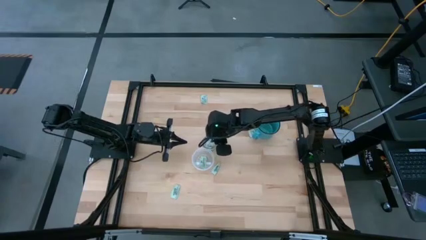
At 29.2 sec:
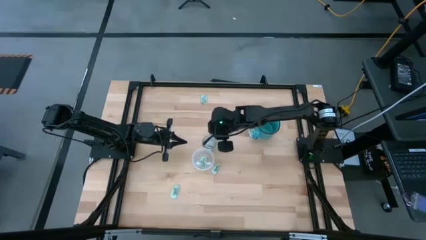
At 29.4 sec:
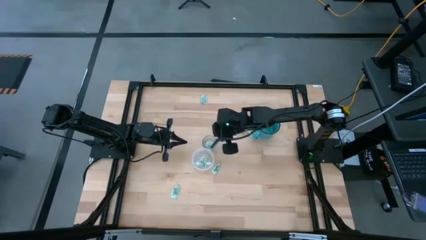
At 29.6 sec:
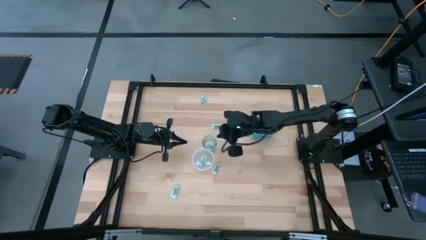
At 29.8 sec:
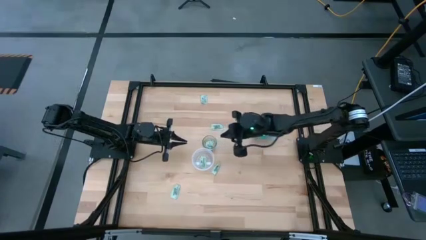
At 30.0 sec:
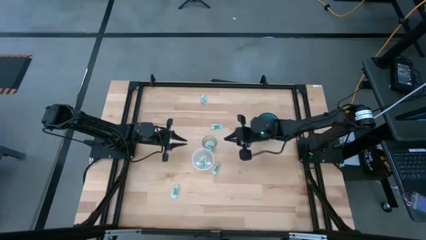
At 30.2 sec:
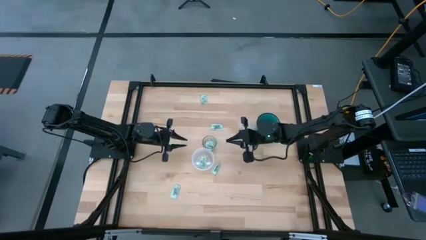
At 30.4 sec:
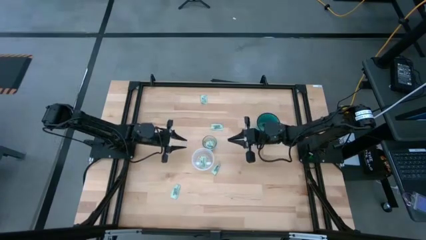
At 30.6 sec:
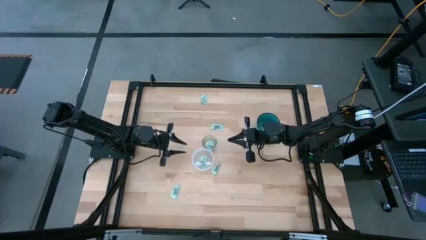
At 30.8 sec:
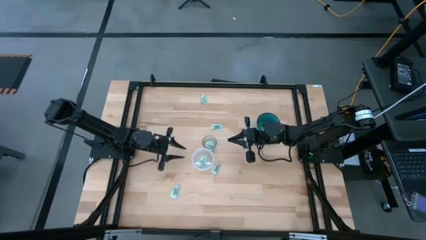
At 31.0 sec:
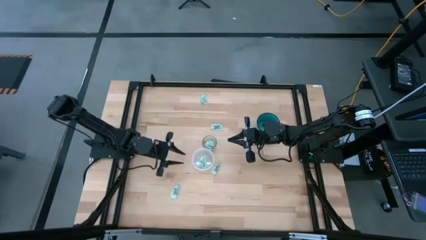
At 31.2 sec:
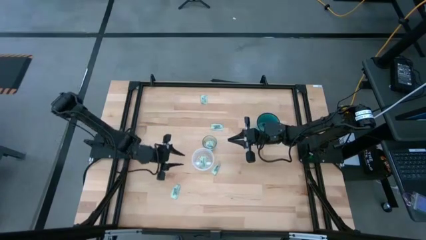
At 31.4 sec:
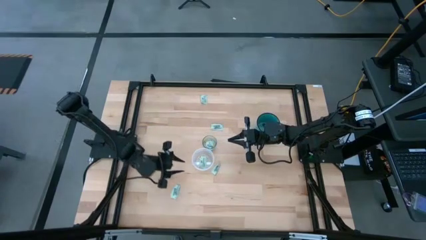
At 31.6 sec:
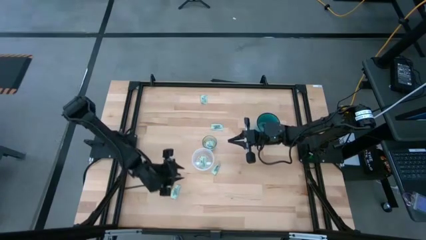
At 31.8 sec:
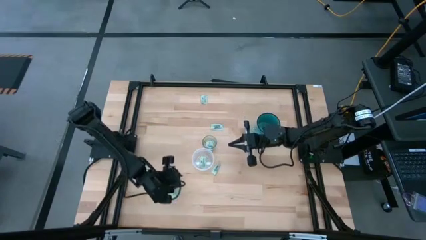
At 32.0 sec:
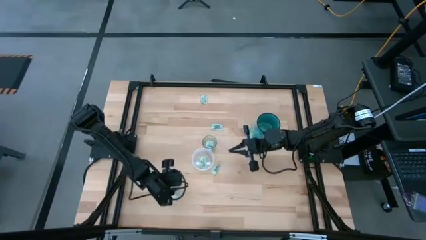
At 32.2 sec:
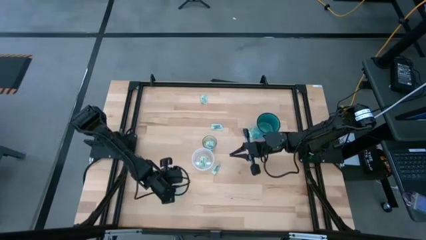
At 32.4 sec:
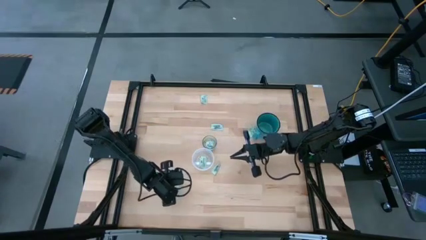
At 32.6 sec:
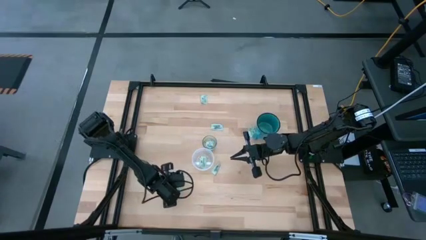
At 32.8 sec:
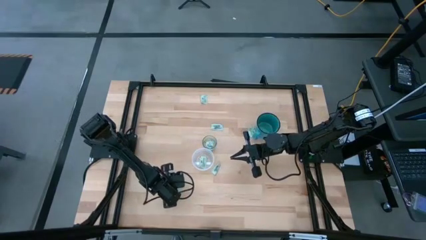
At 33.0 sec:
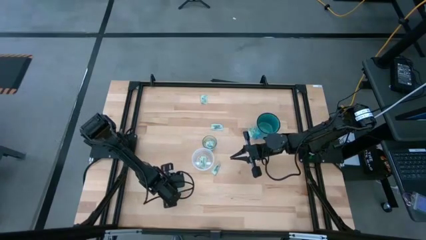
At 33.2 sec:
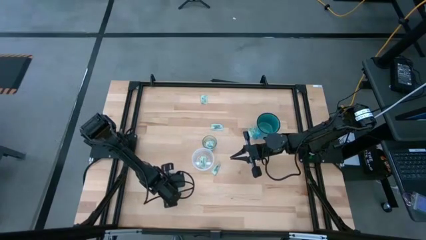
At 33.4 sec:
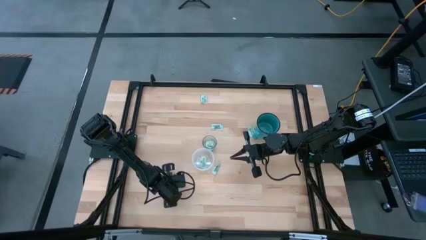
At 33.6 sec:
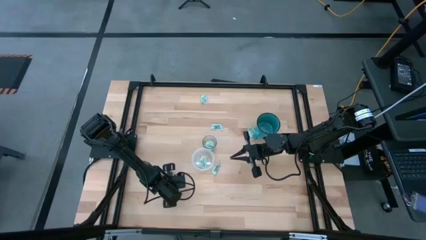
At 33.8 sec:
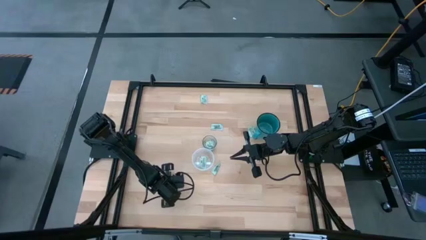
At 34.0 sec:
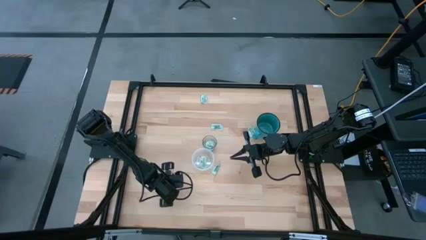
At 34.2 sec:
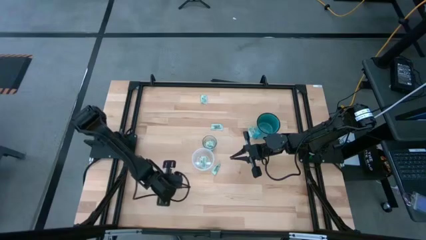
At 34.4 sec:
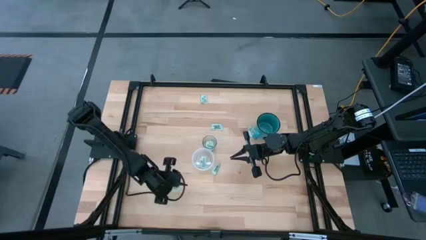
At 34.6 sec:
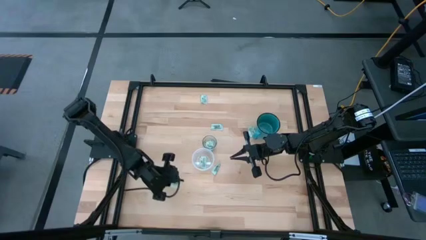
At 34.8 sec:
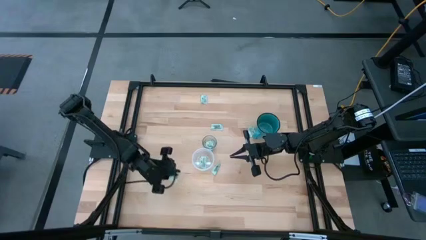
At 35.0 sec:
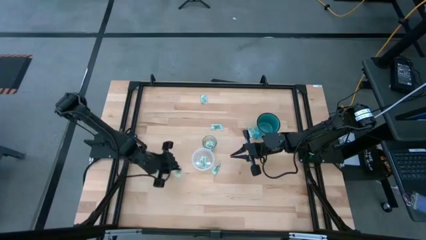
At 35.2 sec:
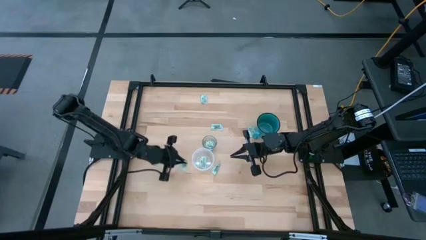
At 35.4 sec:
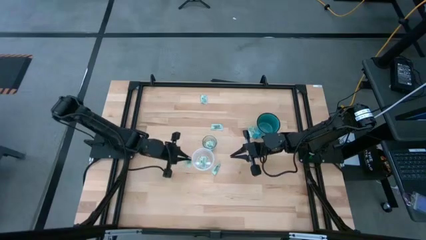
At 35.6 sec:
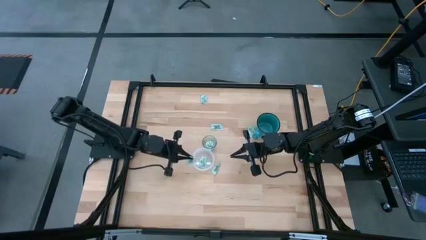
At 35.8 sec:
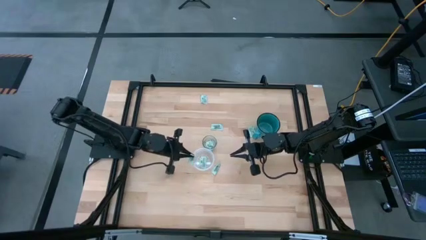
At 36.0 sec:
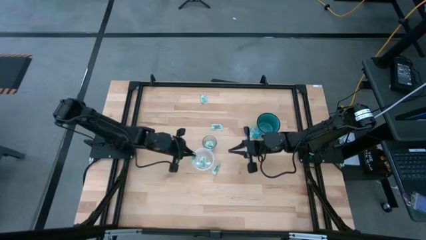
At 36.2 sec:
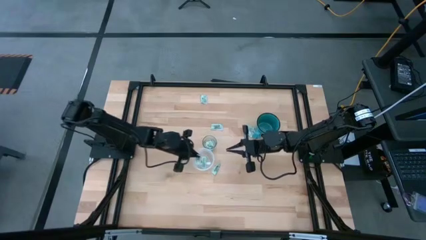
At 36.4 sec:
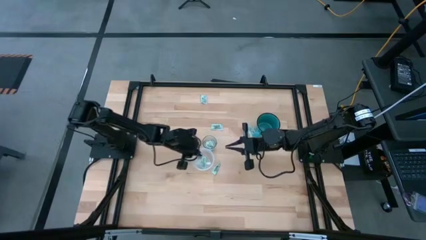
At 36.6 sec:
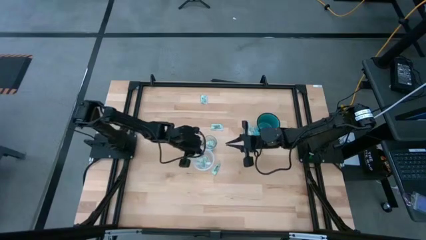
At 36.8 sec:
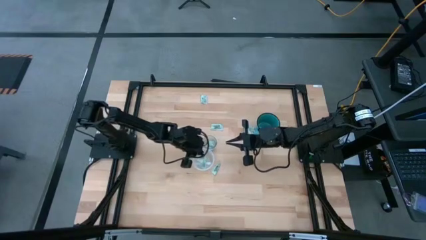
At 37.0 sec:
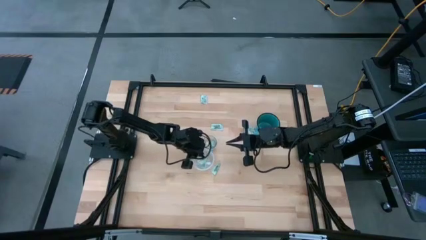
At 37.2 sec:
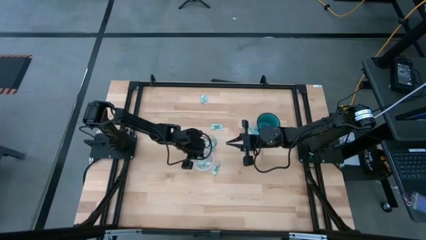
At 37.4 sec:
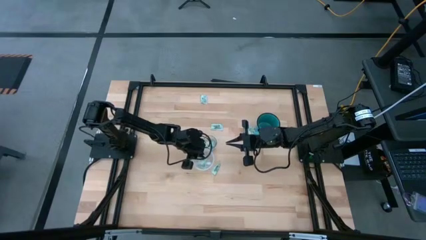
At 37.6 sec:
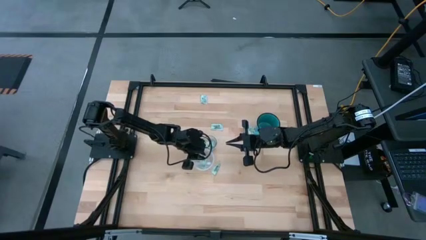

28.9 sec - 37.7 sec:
Task: Pick and place items into bin
Put the transparent stevia packet into the transparent bin

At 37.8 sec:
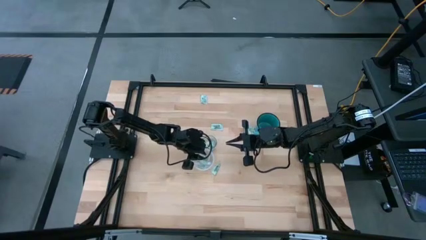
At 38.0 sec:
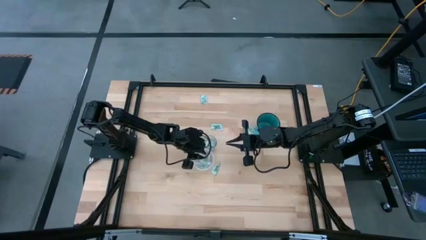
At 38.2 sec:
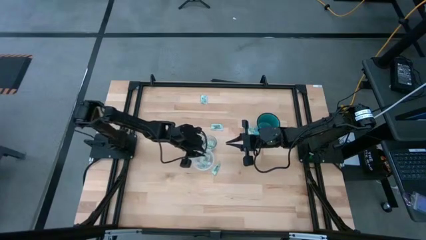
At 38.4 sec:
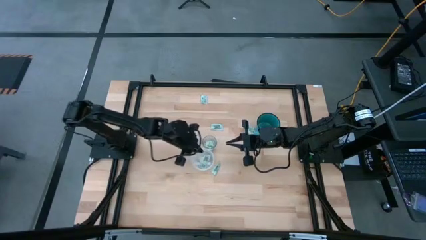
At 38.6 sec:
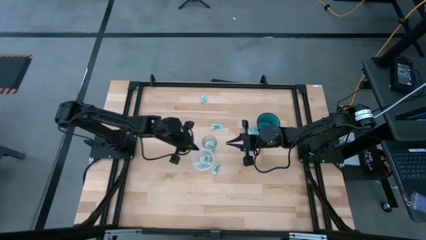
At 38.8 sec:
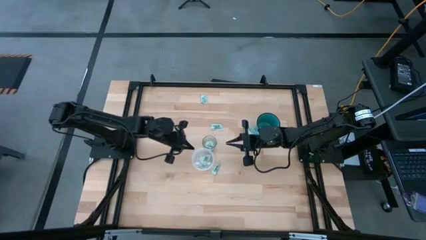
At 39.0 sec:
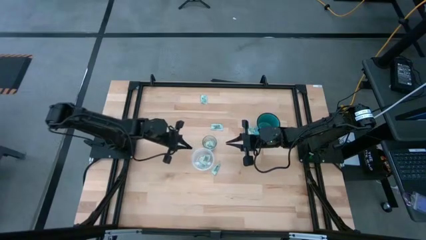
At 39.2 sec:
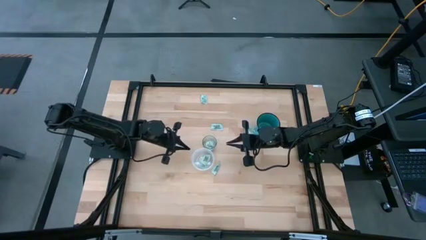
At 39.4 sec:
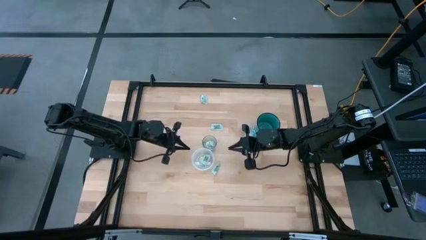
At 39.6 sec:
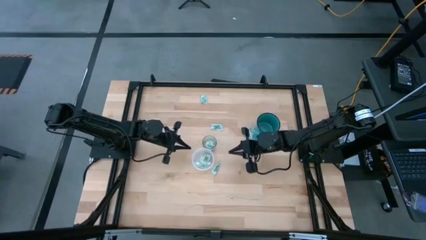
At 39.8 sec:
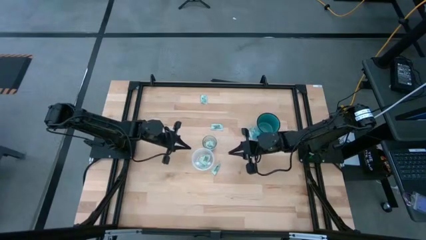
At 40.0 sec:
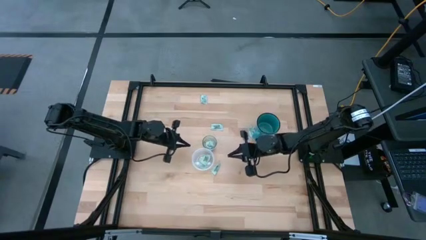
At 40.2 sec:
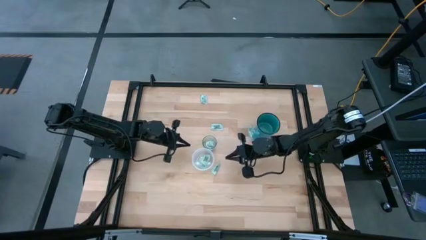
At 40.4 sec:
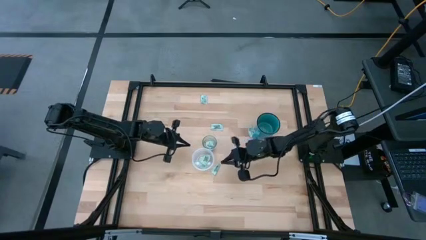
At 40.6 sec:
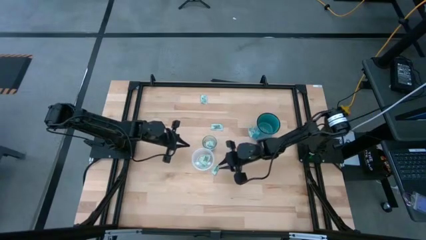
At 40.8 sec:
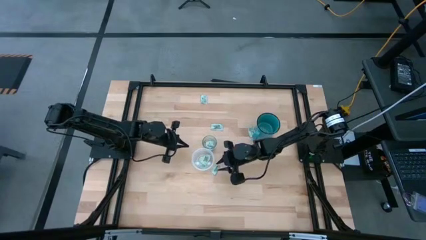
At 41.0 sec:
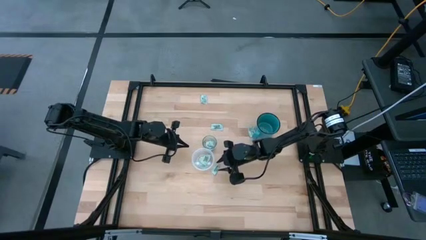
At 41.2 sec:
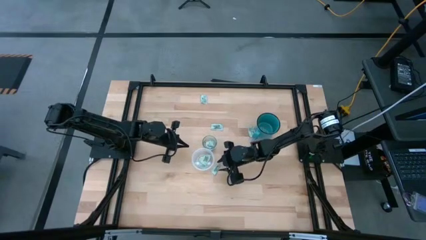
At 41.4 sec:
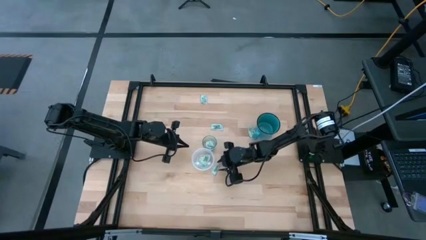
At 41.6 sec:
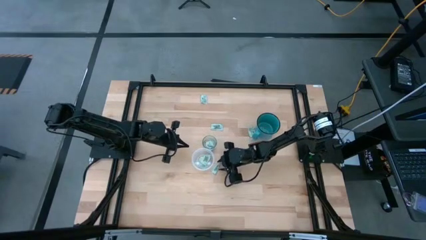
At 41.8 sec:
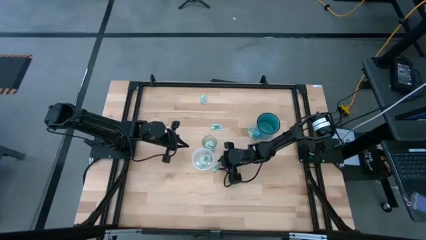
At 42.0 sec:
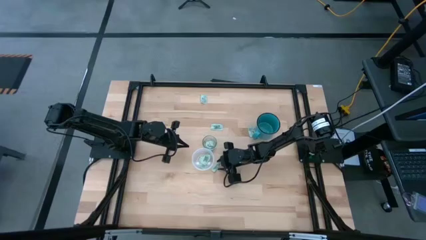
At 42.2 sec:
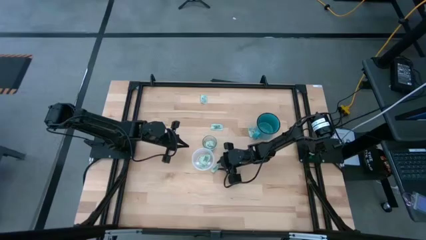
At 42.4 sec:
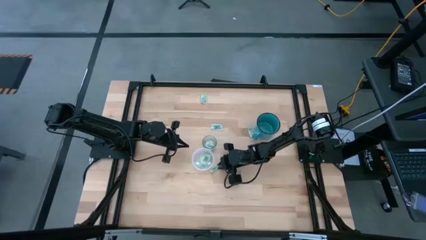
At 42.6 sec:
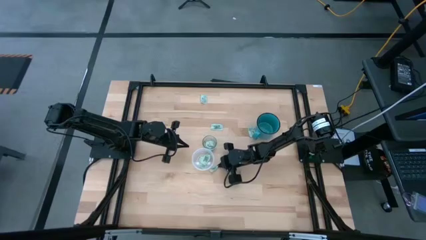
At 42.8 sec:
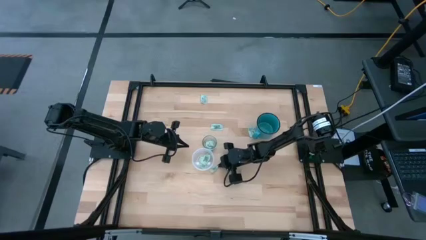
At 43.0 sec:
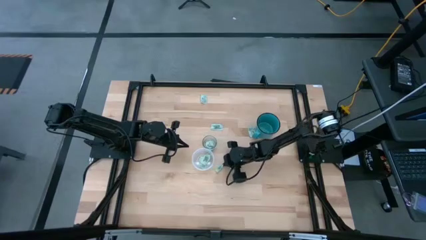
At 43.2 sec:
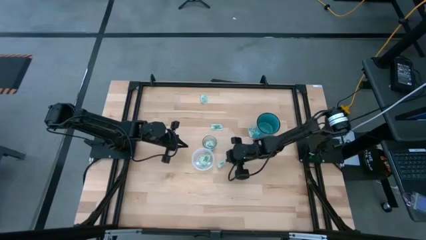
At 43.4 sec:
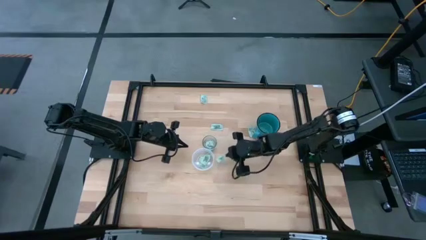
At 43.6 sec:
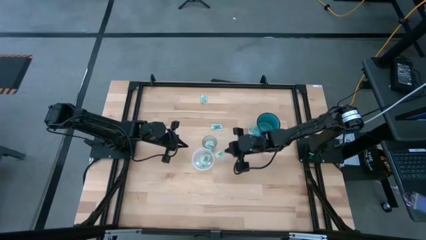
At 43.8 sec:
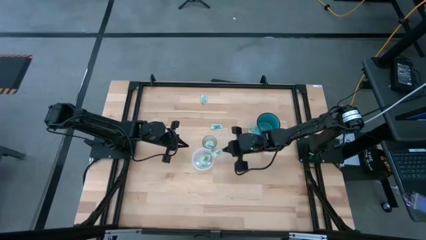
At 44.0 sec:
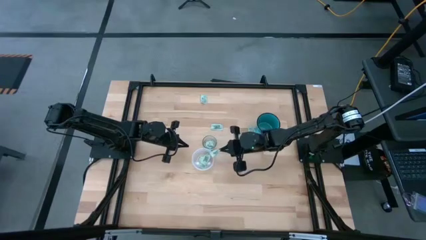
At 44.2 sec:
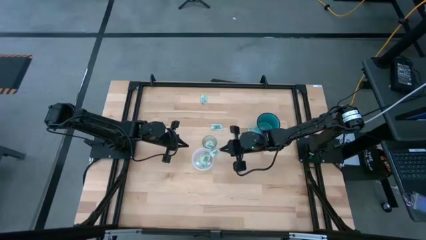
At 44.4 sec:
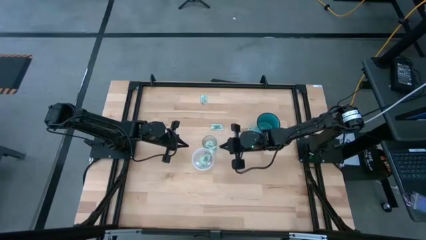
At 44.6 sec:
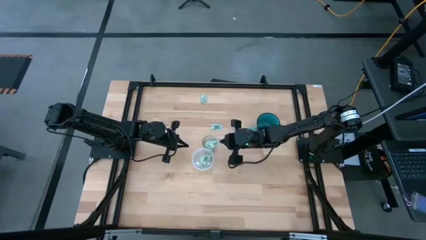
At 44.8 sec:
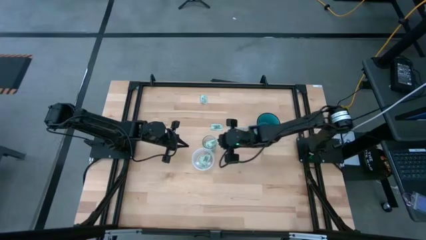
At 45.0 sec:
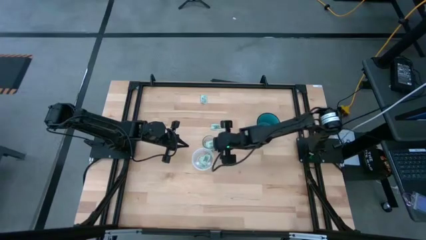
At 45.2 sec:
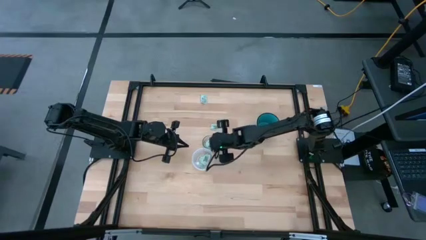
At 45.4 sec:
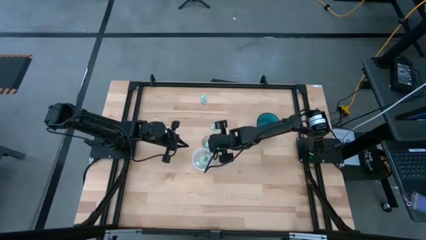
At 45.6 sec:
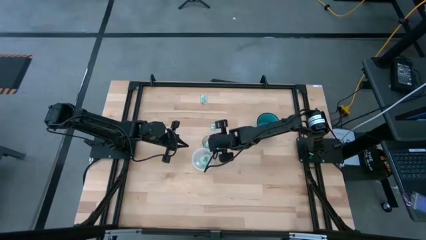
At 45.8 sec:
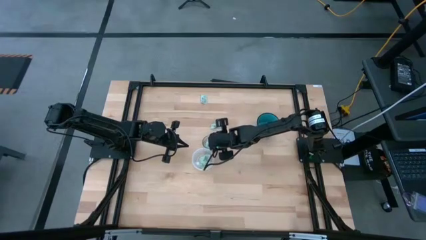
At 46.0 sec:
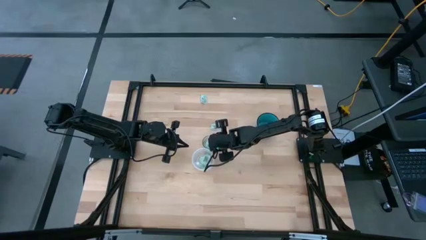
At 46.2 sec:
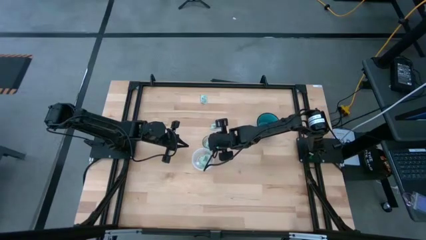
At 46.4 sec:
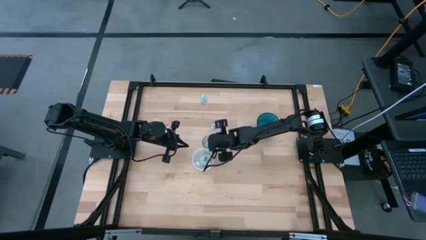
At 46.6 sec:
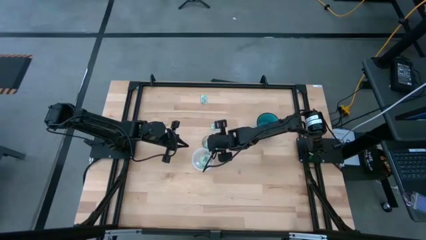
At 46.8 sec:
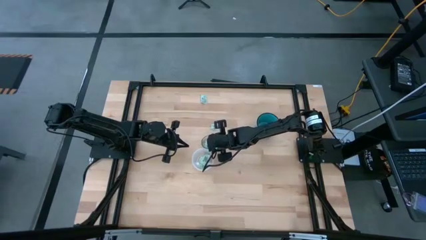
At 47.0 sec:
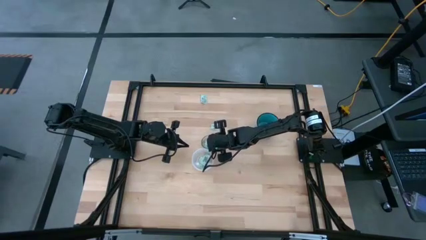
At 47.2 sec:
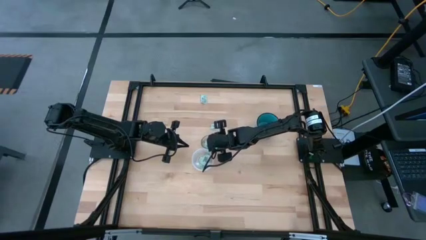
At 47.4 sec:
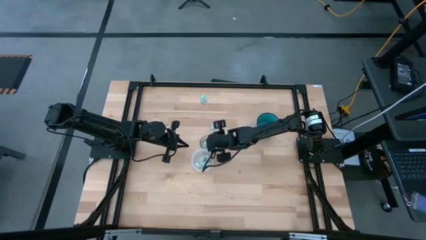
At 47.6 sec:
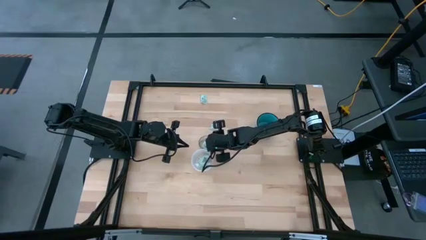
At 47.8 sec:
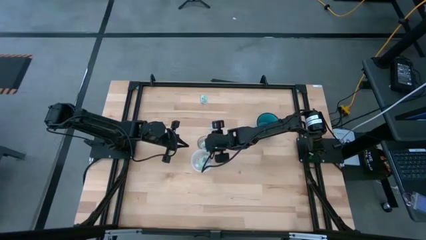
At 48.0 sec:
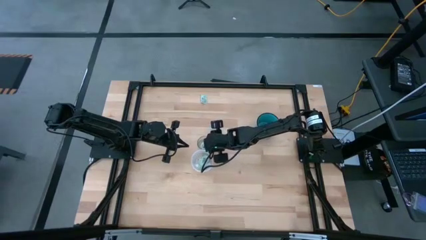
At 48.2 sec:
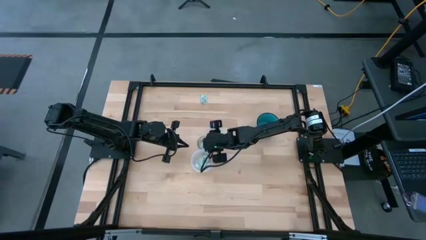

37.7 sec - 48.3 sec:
Put the transparent stevia packet into the transparent glass bin
